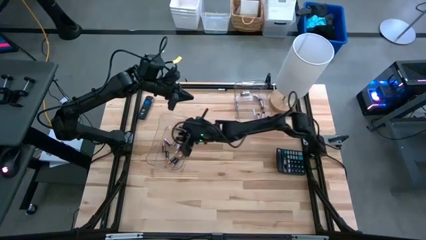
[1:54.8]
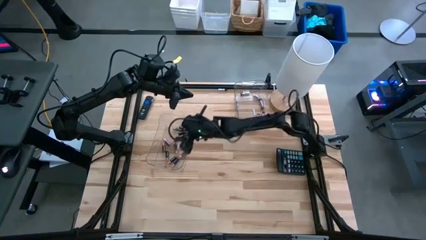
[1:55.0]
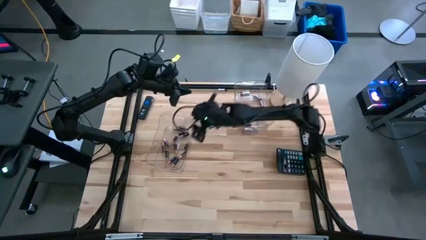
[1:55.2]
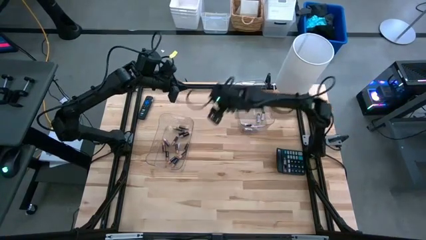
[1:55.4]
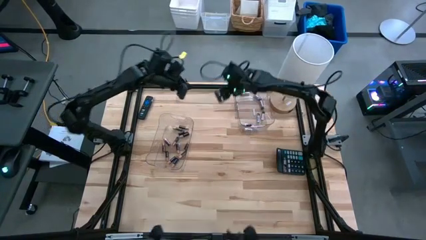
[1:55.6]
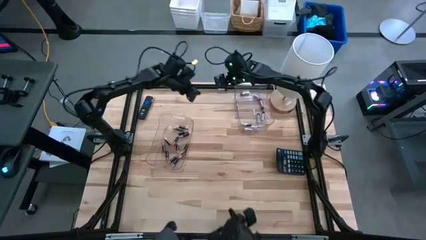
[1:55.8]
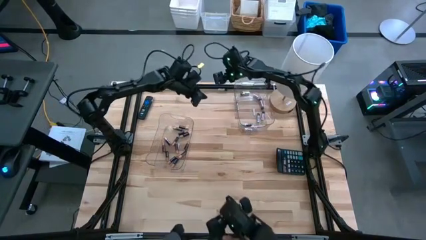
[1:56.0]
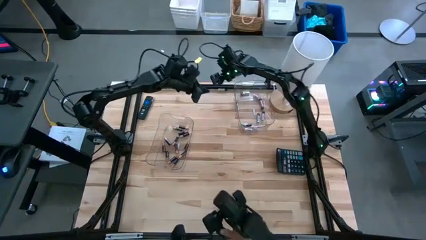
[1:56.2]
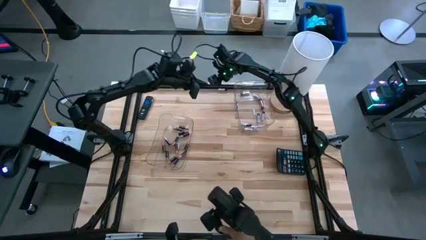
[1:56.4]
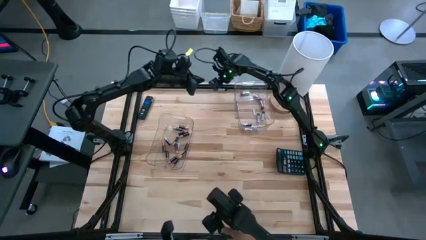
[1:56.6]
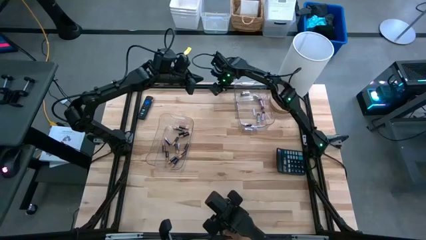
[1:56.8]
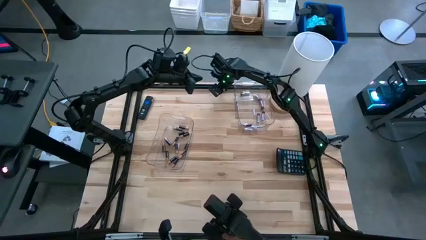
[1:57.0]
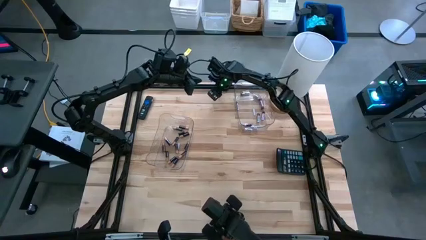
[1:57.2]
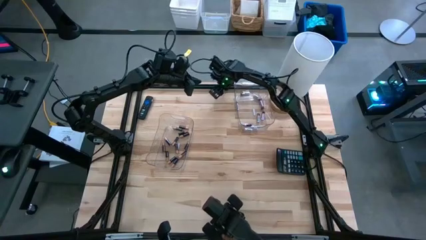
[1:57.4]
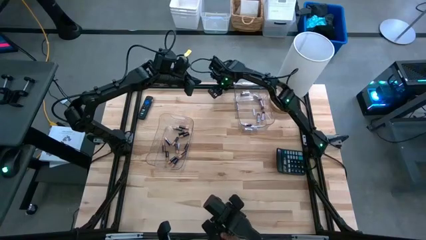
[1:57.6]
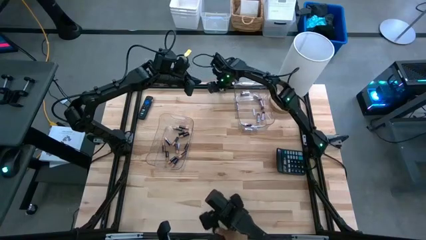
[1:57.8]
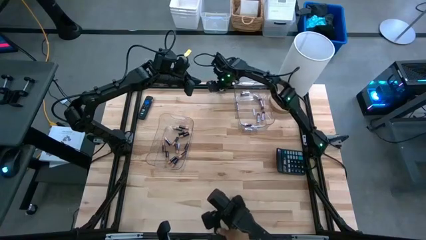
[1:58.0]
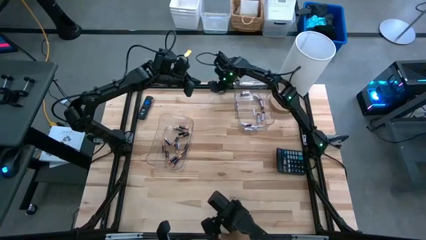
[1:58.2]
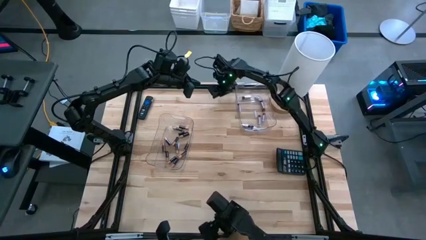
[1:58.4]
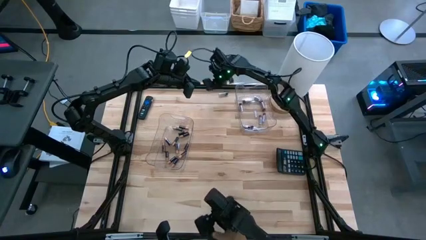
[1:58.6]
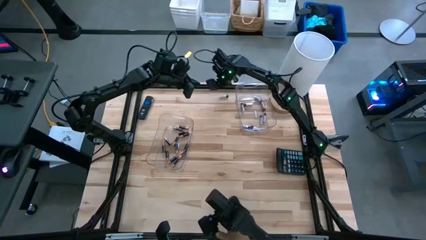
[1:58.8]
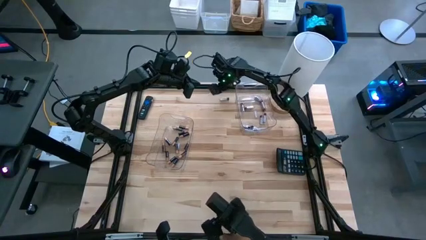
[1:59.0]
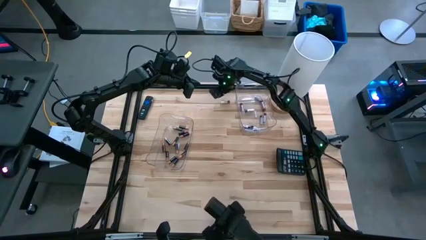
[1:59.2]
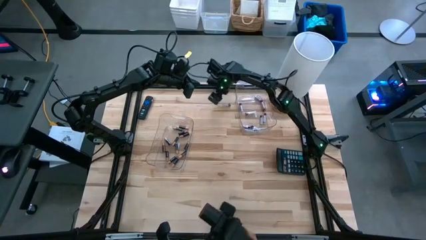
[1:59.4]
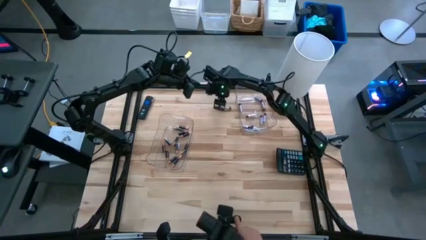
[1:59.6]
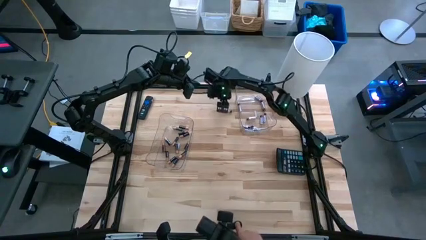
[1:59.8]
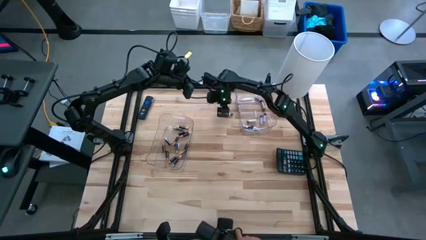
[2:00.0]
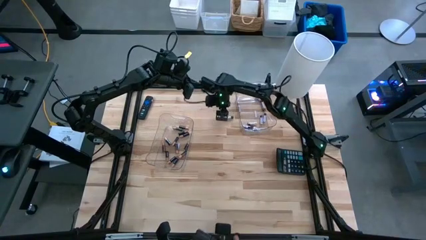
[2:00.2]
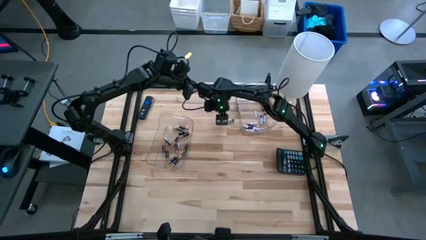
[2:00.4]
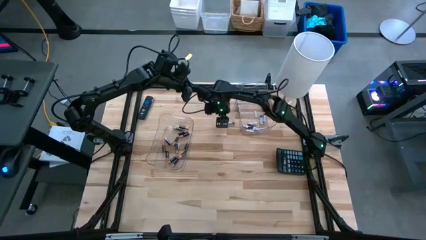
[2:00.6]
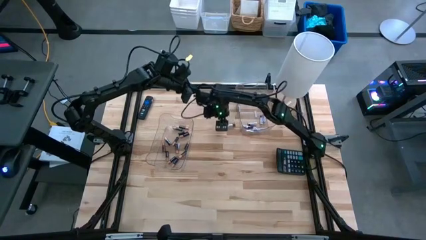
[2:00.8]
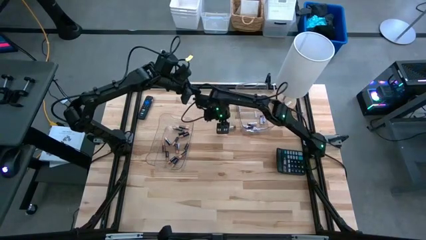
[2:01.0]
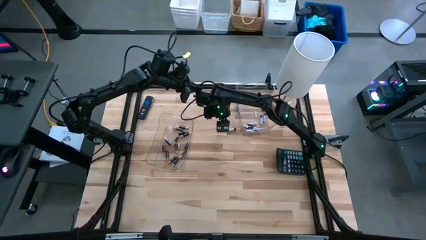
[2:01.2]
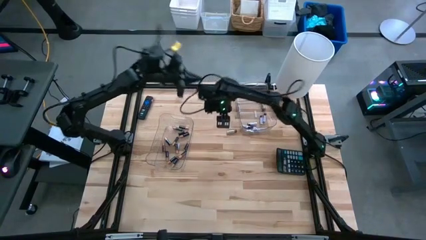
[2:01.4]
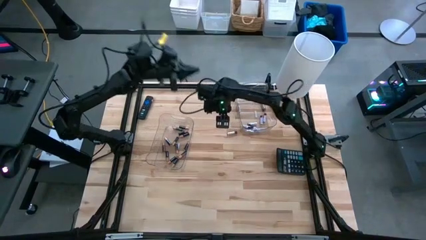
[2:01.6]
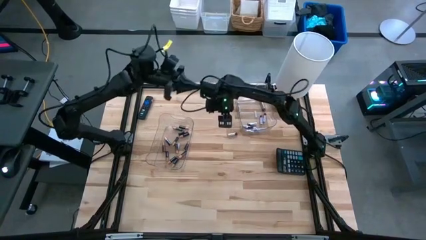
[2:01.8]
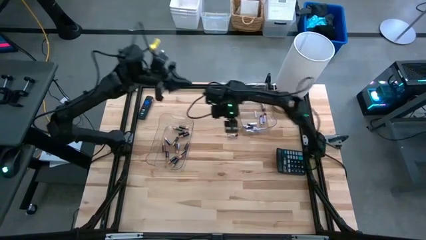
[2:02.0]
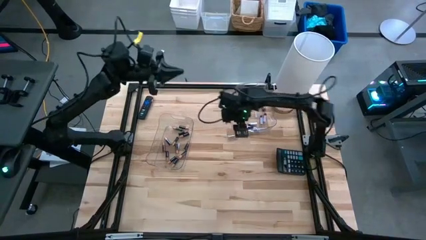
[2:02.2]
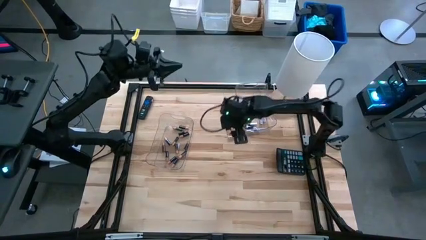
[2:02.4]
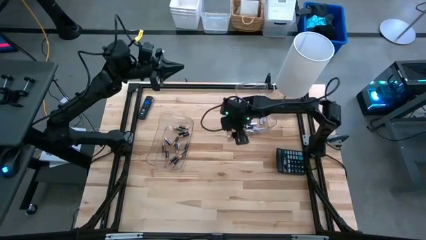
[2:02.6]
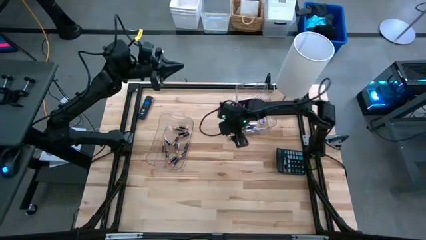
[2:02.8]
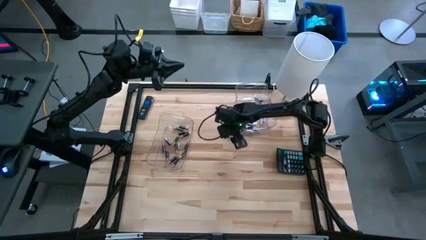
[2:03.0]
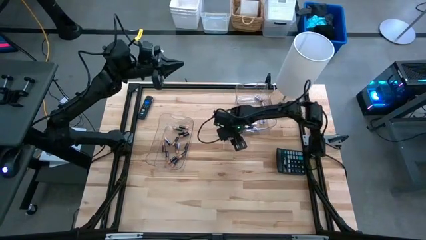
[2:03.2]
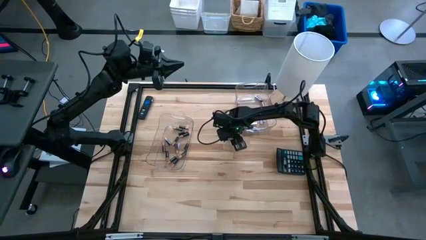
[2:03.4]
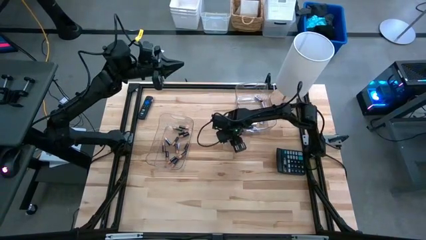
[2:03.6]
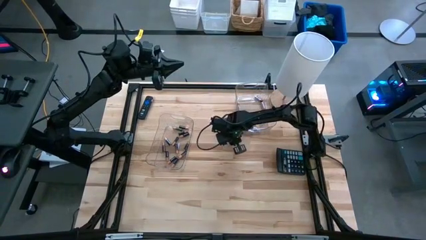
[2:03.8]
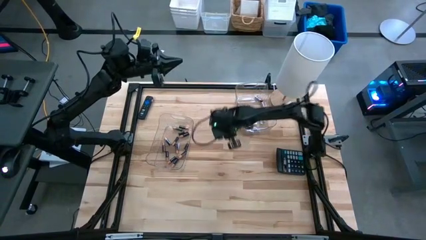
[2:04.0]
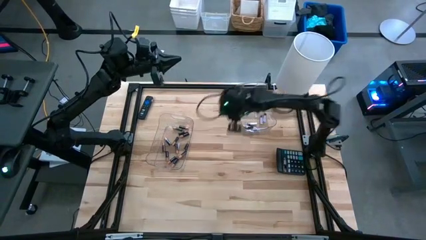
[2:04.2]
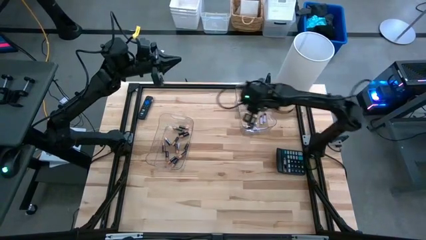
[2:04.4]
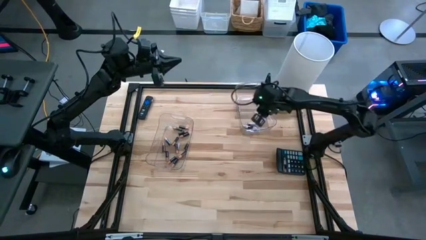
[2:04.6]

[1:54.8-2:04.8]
Task: Sort batteries
Put the silver battery into the right transparent bin

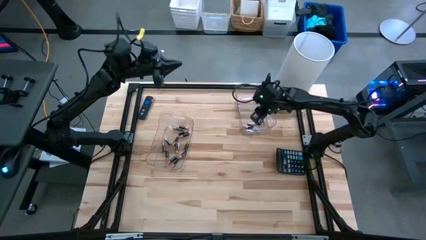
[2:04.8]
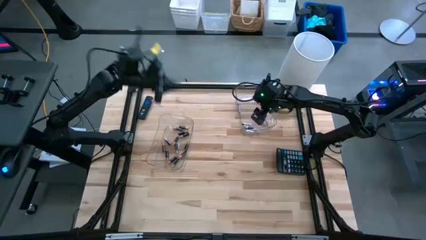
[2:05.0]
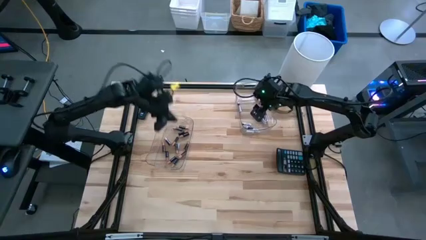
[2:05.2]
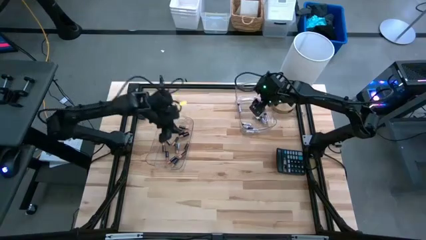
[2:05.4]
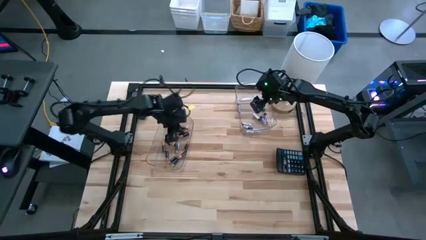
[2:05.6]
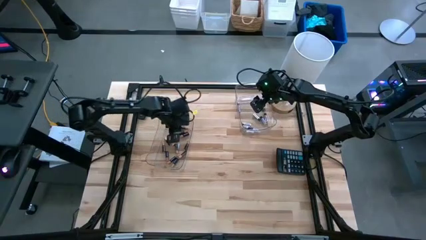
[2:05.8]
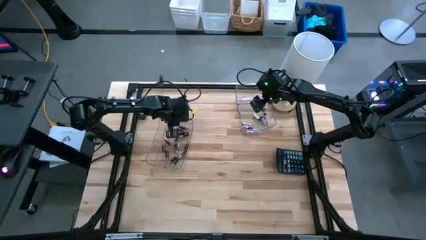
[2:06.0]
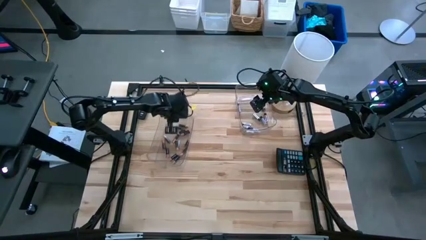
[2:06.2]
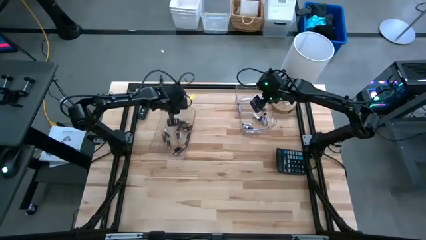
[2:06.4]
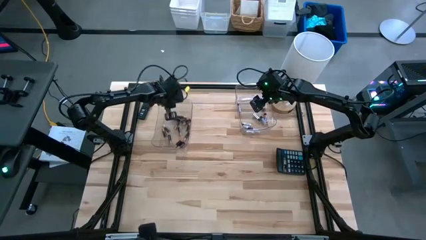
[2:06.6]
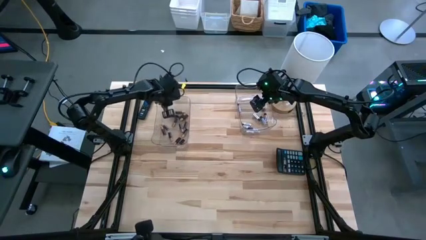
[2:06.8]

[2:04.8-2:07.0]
Adjust the left transparent bin

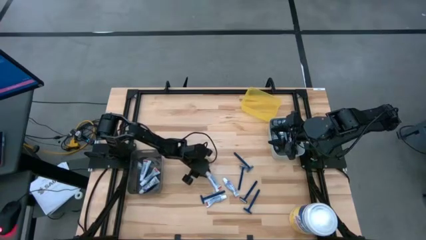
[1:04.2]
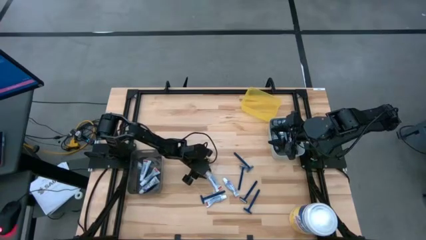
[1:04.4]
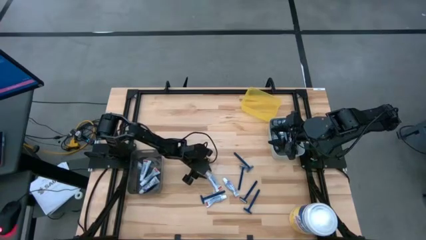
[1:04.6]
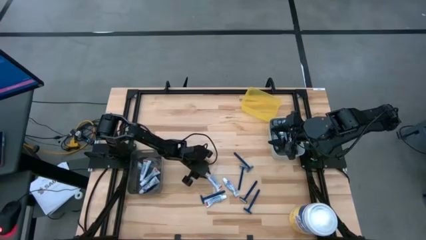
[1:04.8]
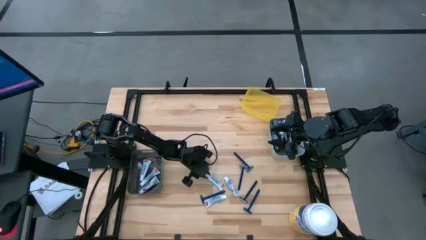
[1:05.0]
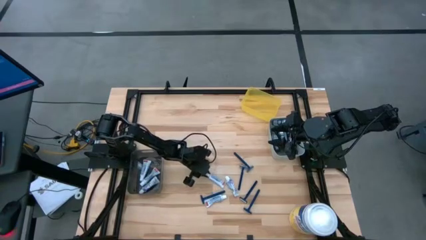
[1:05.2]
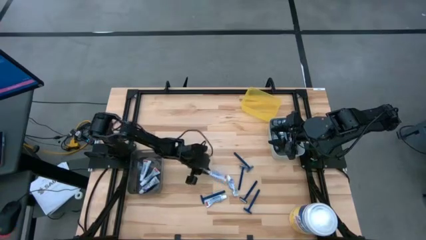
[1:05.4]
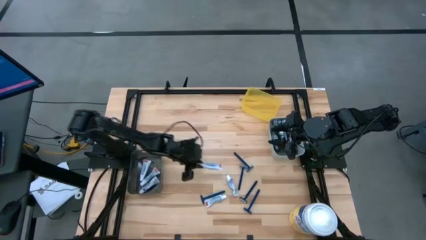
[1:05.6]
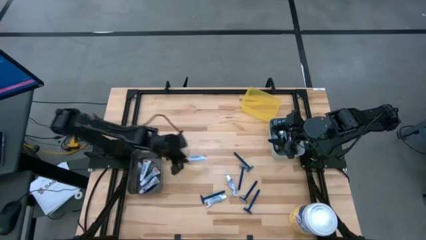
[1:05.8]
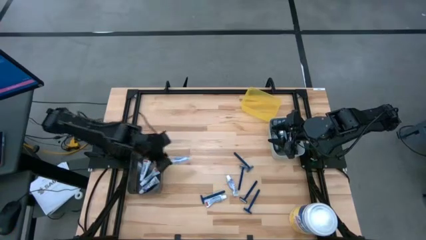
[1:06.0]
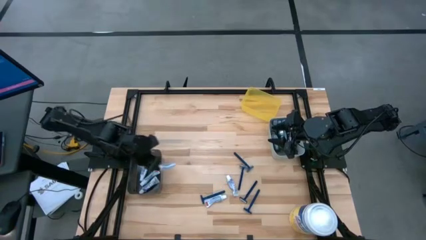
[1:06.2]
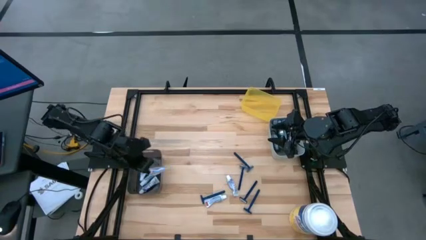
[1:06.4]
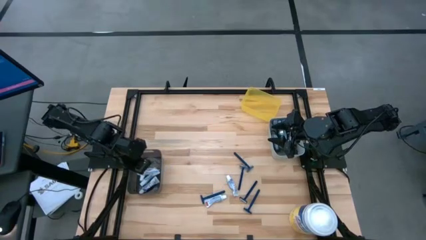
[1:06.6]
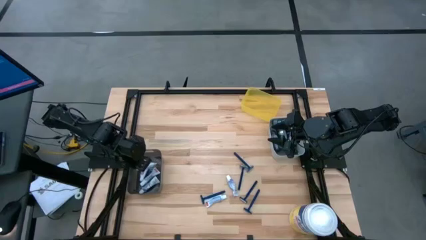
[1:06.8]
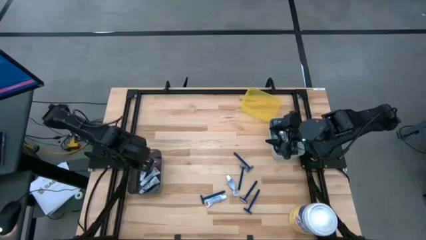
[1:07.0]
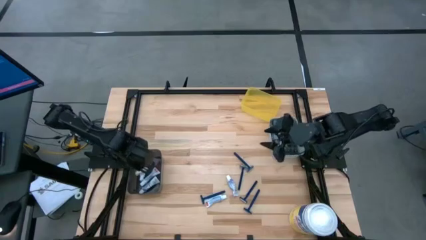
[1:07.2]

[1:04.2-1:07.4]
Task: Pick & Place Travel size toiletries
Put the white toothpaste into the black bin
